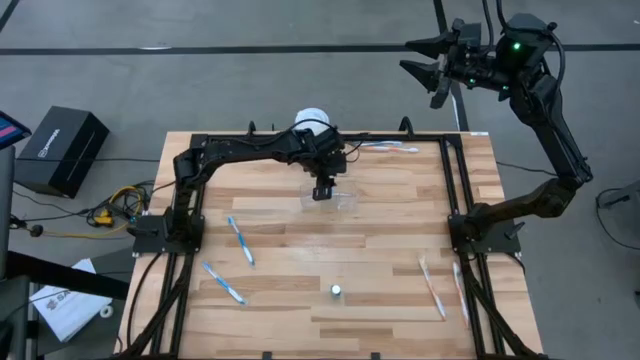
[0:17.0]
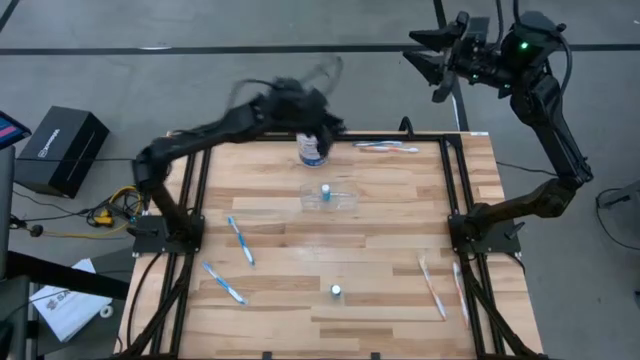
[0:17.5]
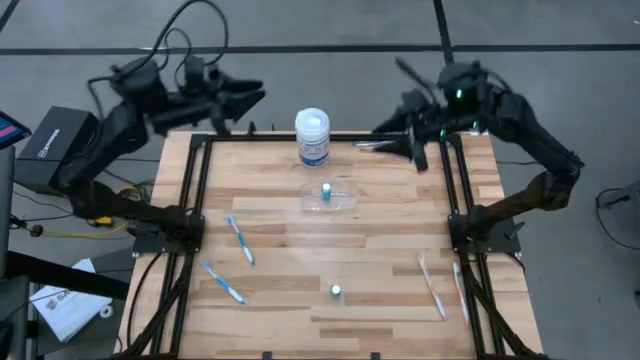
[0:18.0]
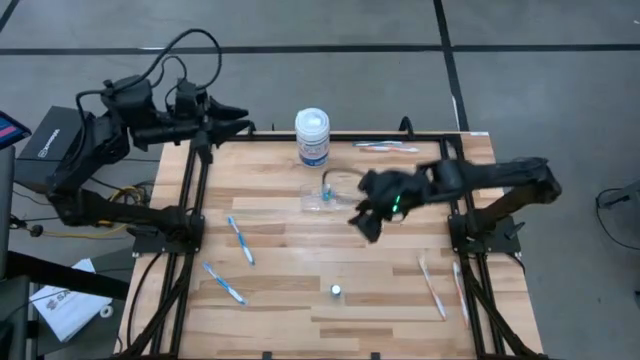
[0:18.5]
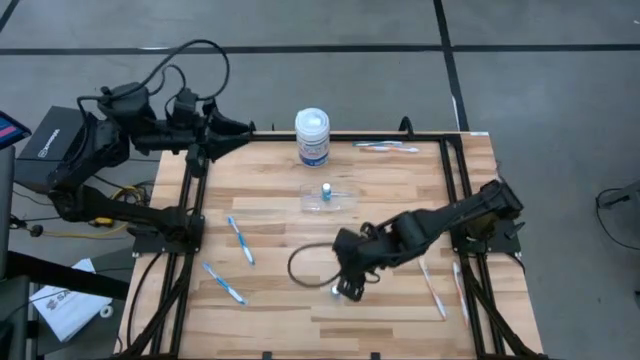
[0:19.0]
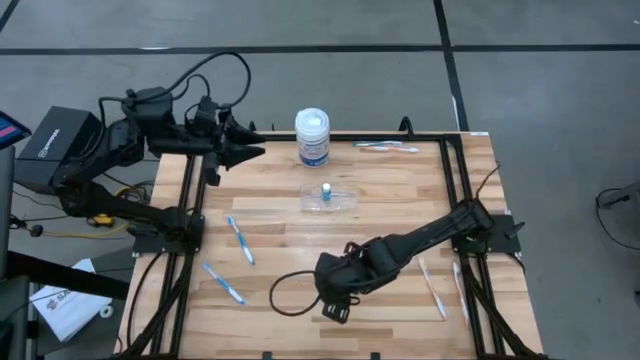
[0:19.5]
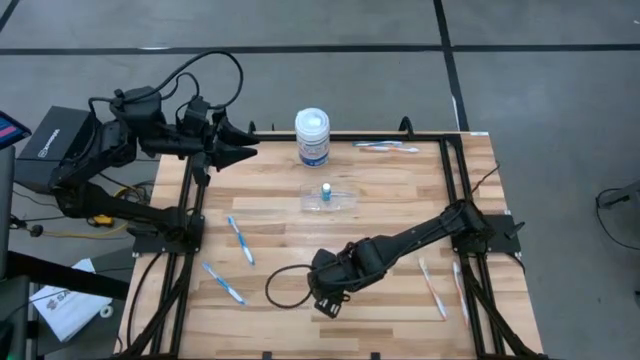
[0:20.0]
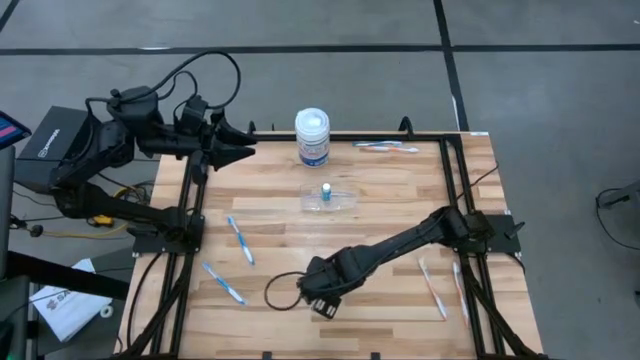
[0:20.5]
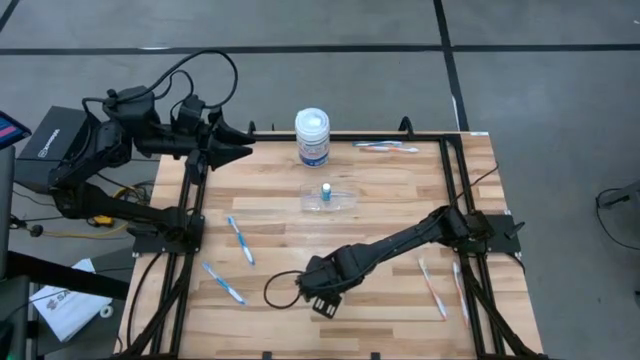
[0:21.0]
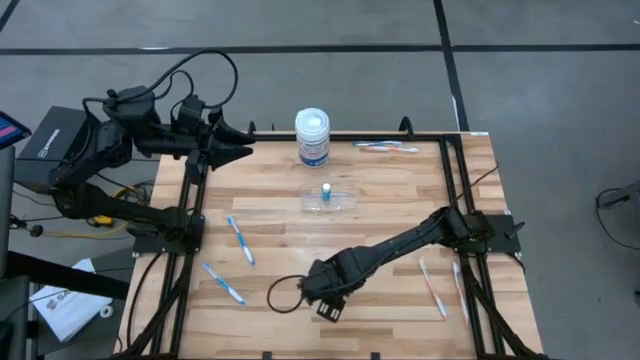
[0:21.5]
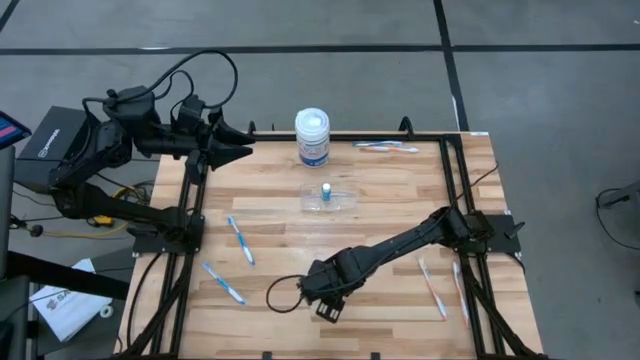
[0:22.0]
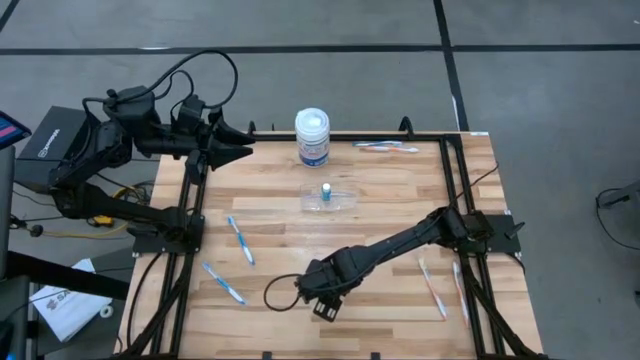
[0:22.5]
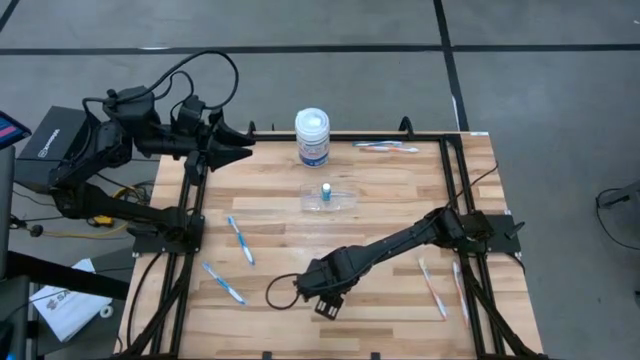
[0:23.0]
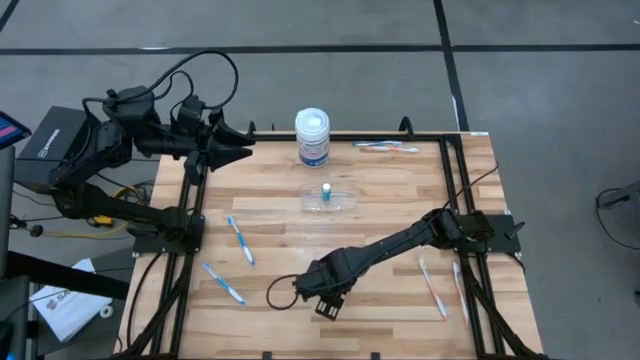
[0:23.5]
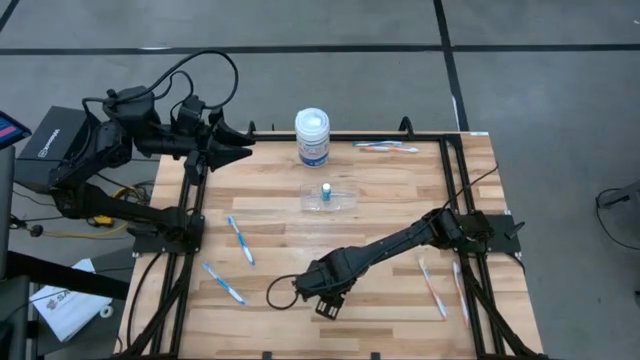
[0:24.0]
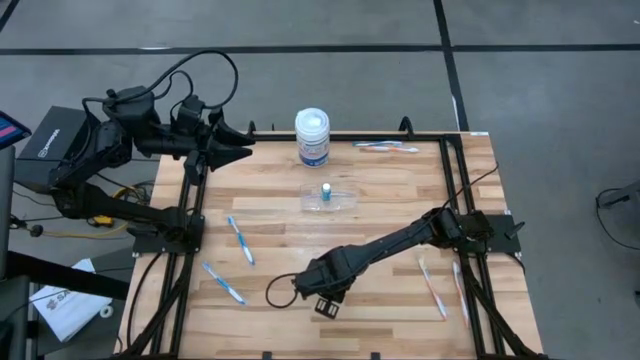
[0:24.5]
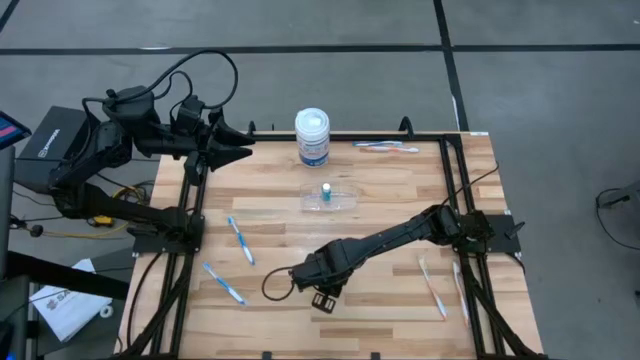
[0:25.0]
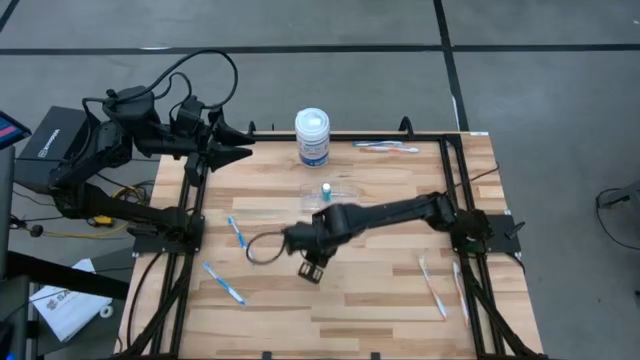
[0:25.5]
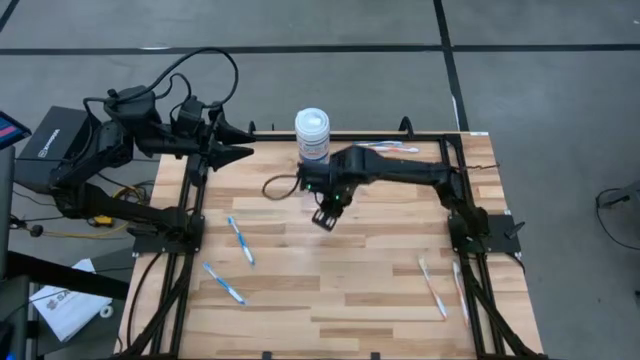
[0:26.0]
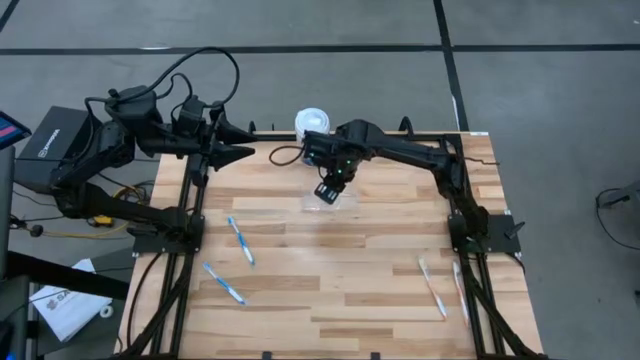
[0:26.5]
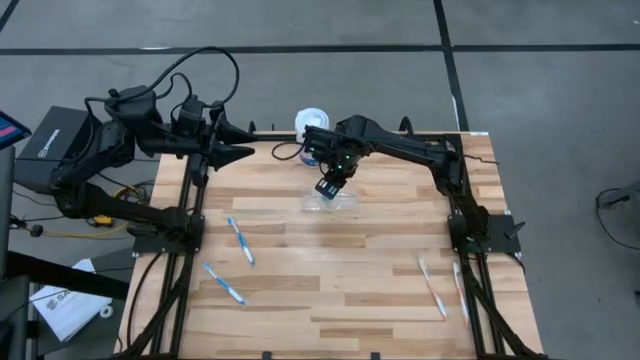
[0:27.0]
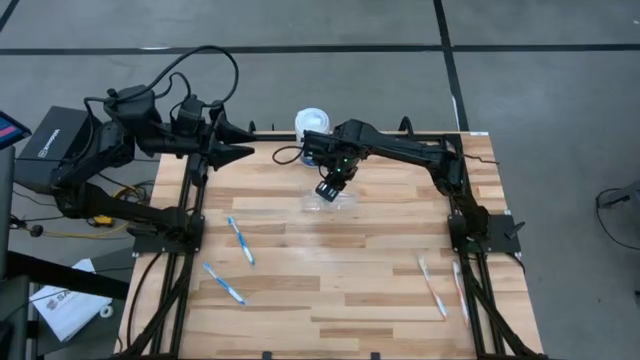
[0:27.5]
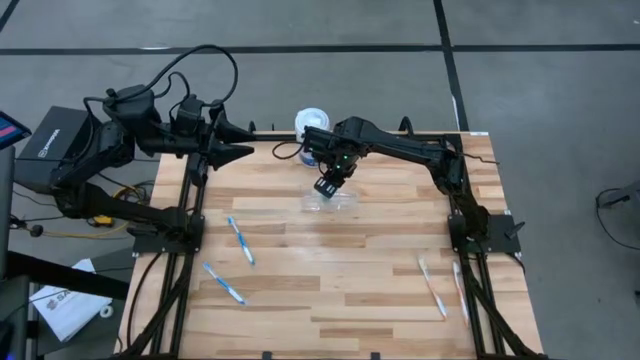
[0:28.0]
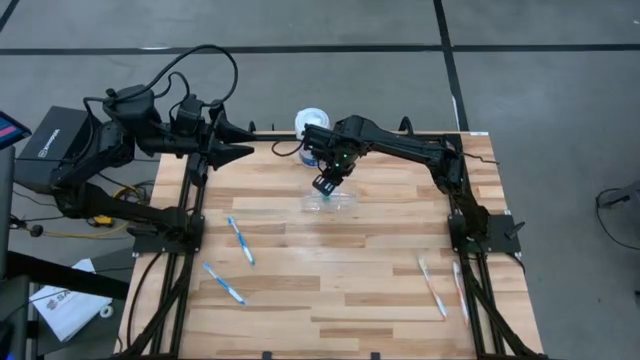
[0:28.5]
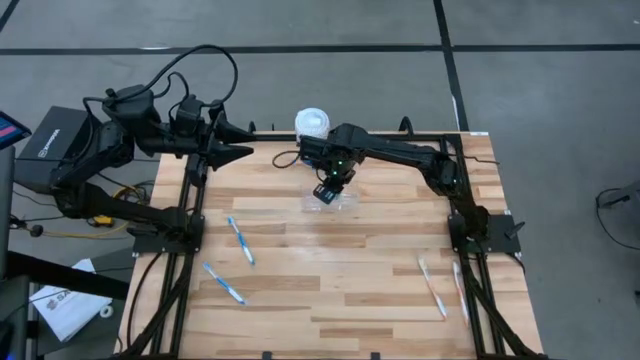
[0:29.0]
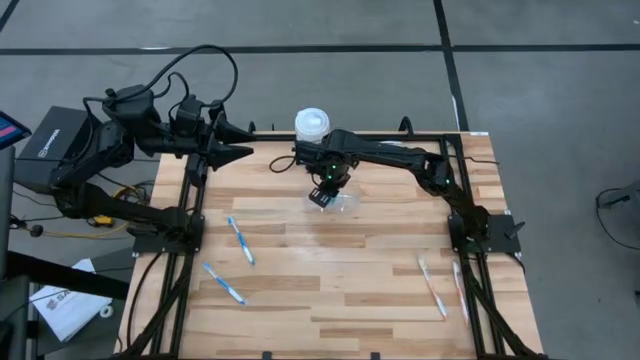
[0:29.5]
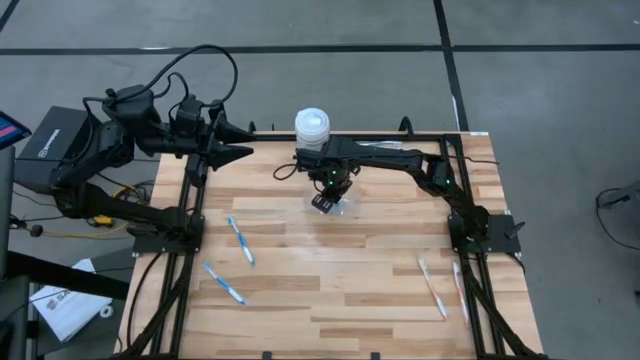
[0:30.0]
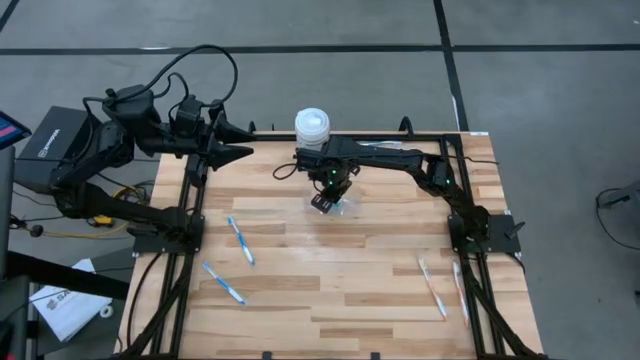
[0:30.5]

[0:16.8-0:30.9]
Task: Pick & Place toothbrushing station
Put the mouthwash into the transparent organizer

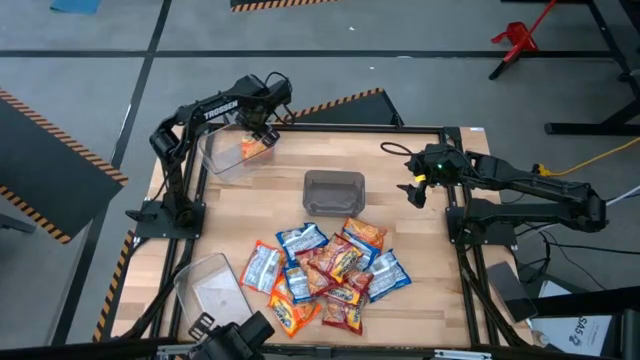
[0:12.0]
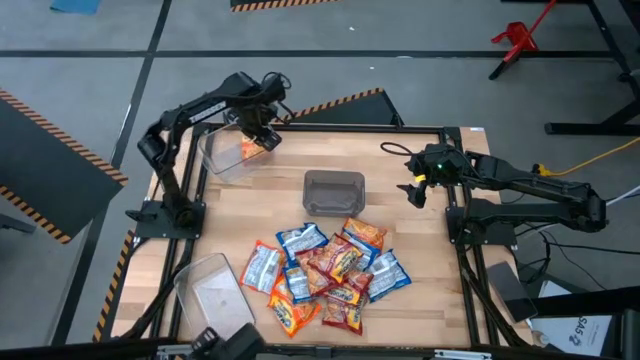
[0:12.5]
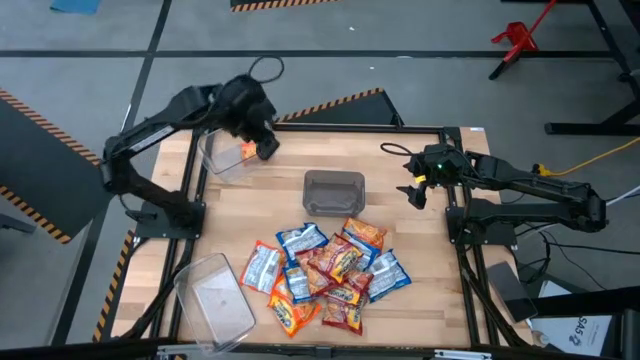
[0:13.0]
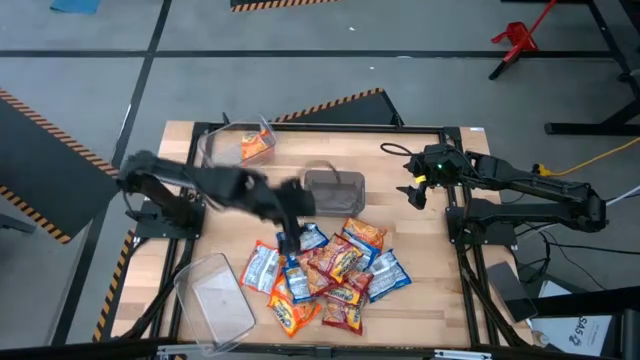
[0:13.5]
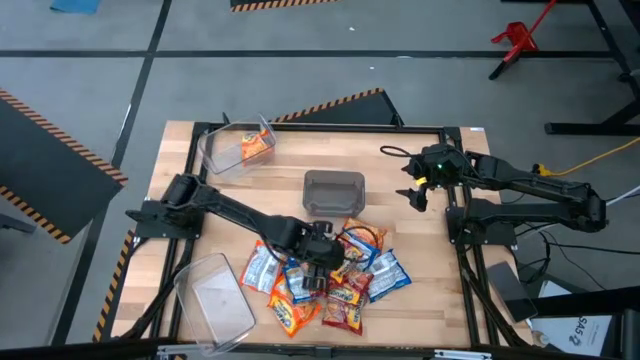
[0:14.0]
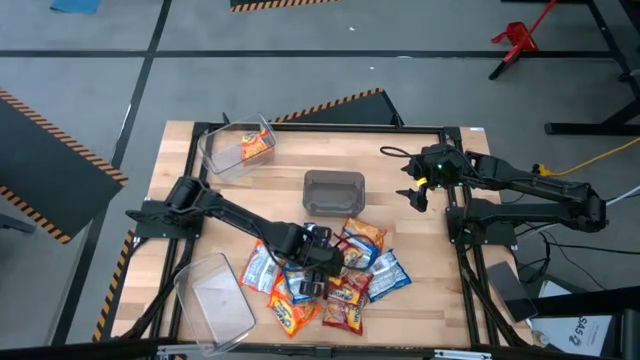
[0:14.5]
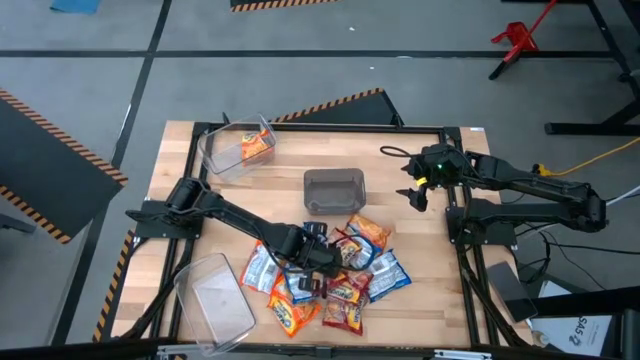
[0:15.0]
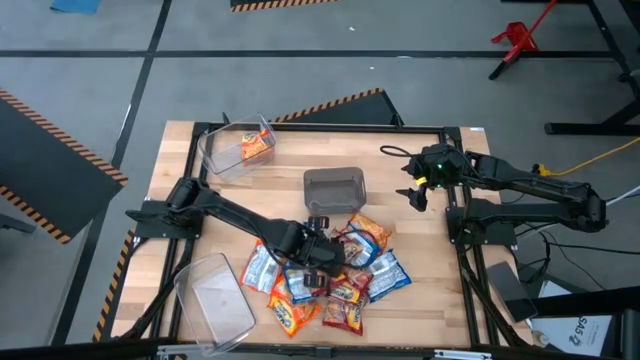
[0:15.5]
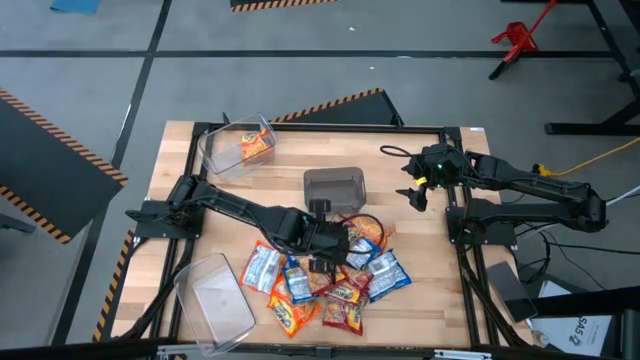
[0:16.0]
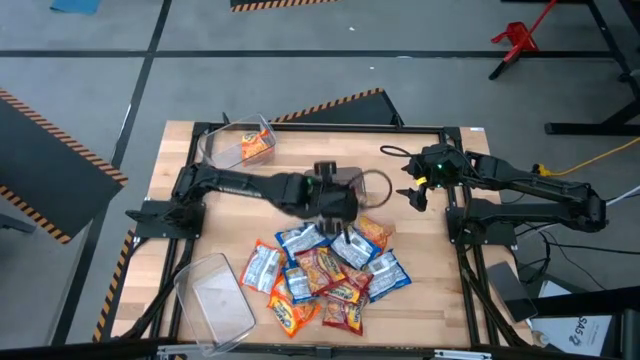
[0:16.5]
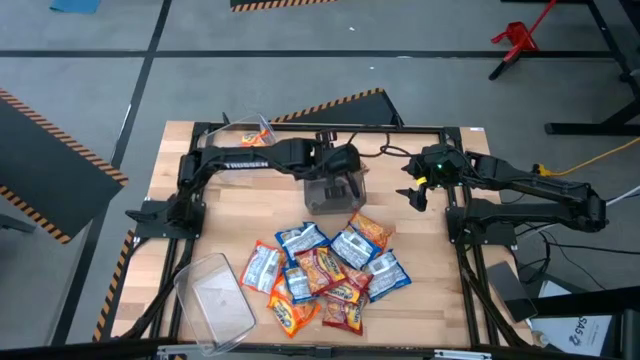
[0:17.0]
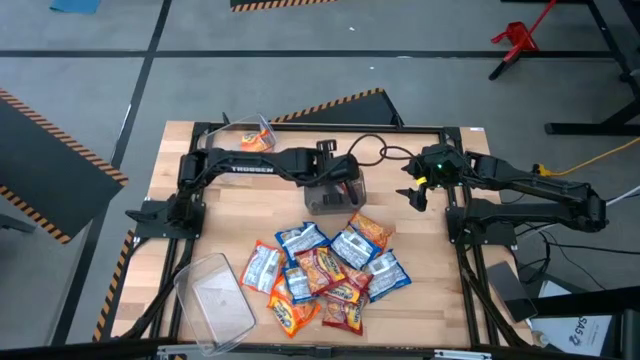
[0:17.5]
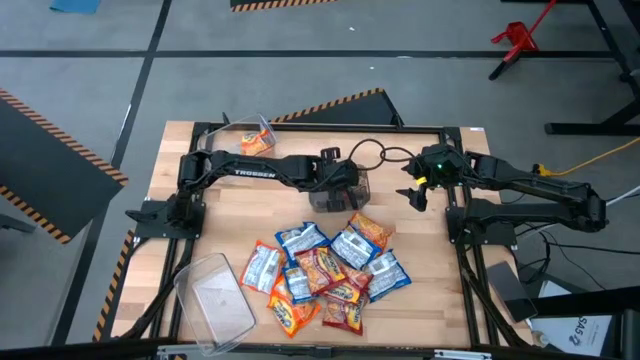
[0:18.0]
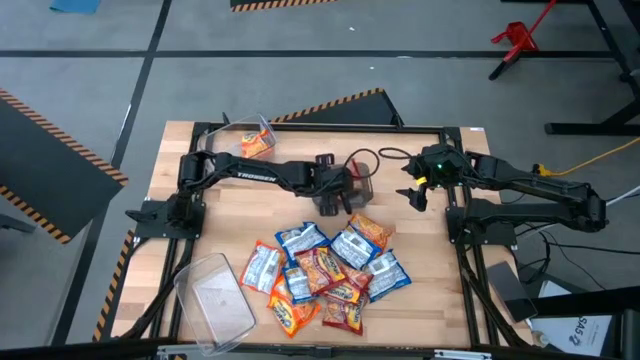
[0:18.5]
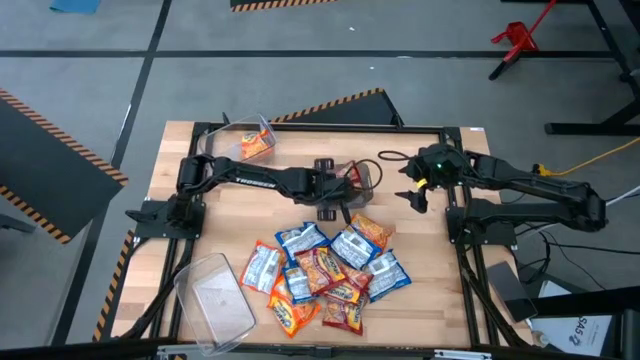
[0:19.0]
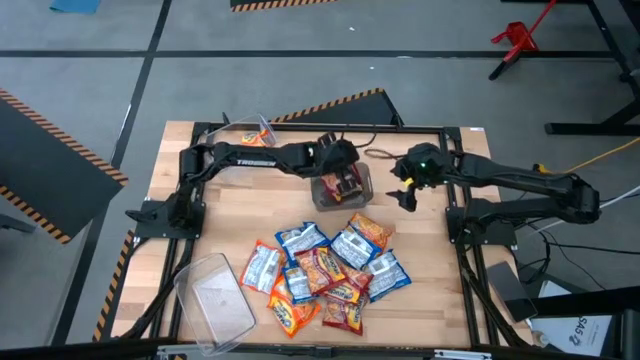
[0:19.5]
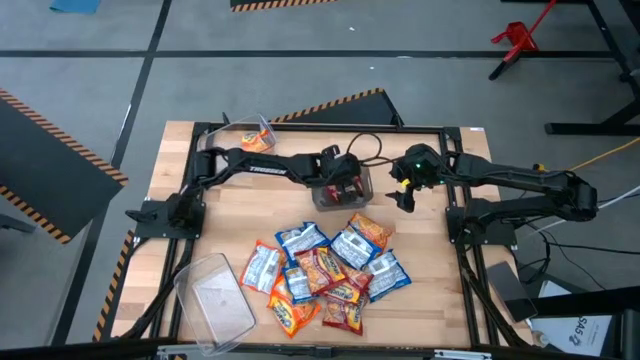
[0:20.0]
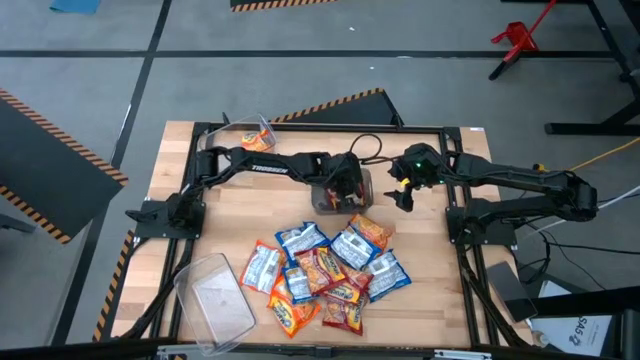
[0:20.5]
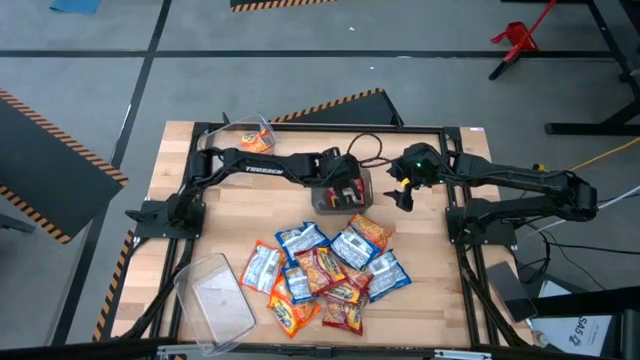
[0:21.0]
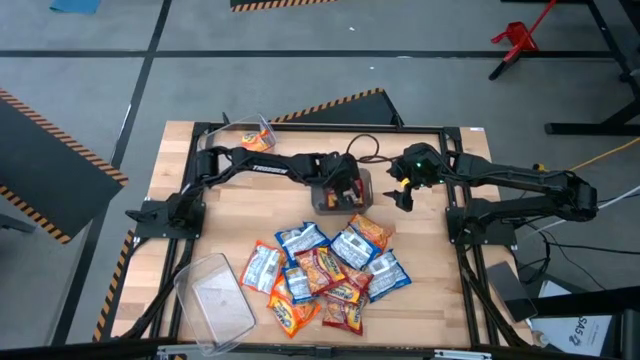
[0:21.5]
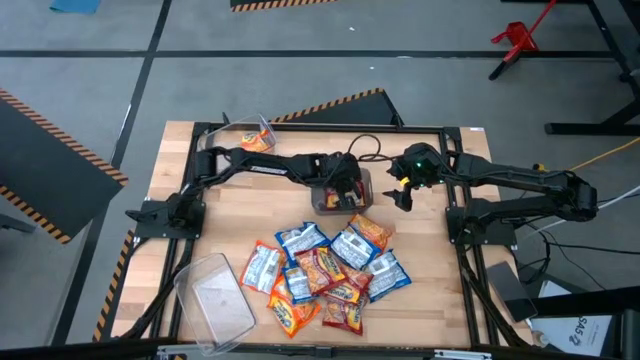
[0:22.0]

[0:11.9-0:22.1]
Task: Sort Maruchan noodles
Put the red noodle pack into the black bin
